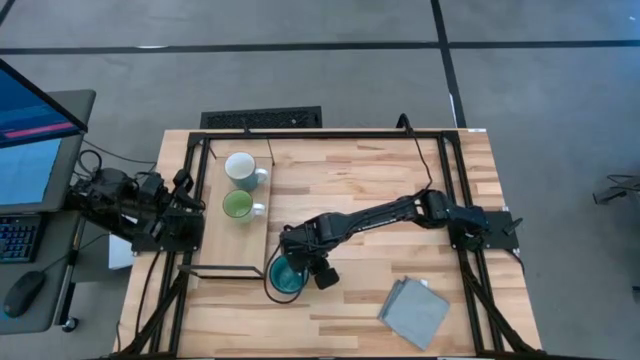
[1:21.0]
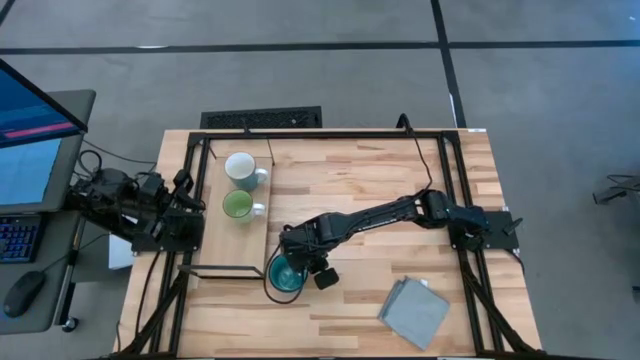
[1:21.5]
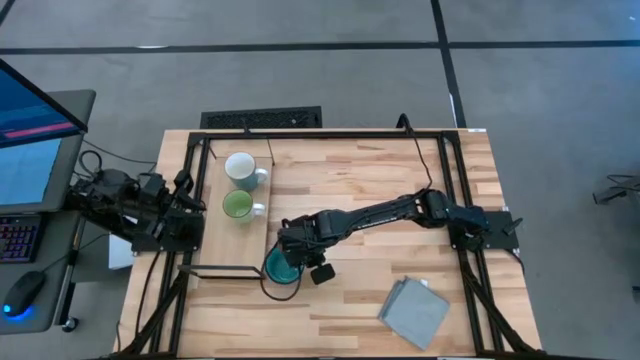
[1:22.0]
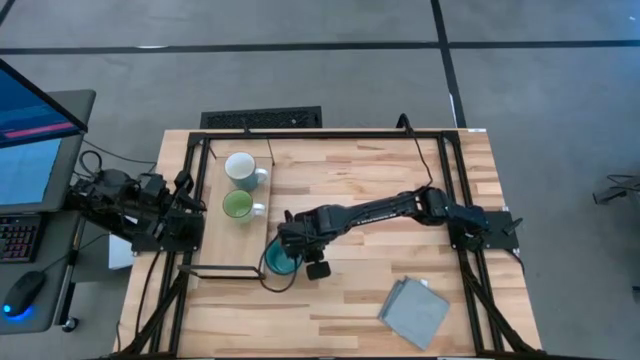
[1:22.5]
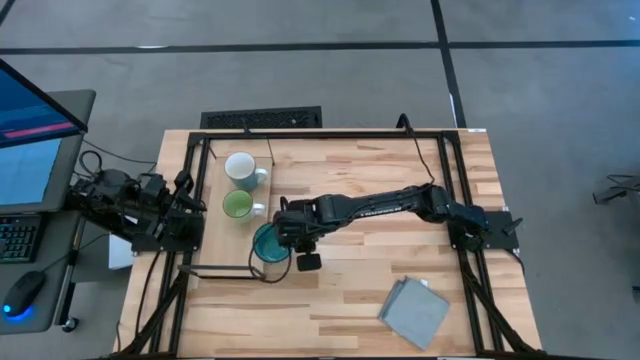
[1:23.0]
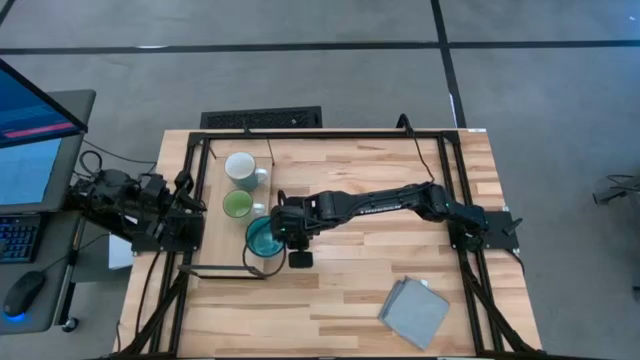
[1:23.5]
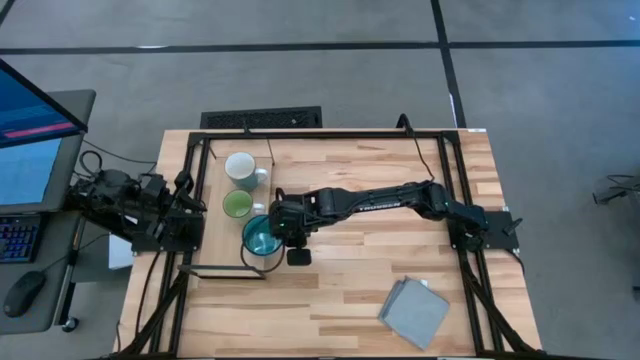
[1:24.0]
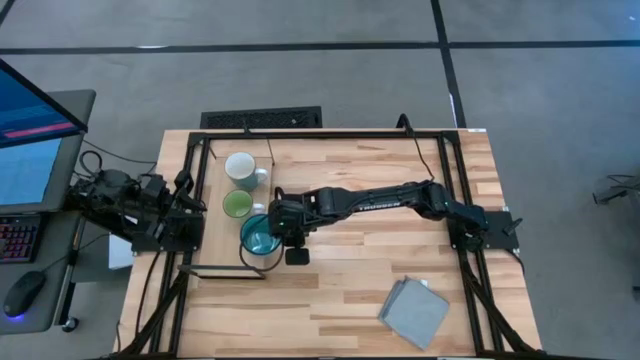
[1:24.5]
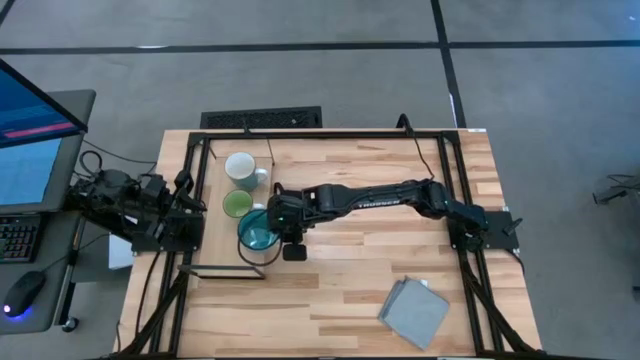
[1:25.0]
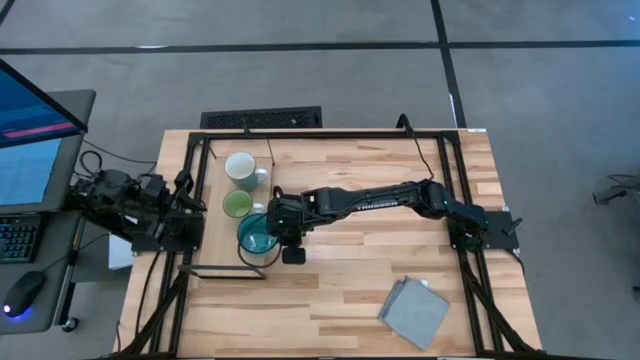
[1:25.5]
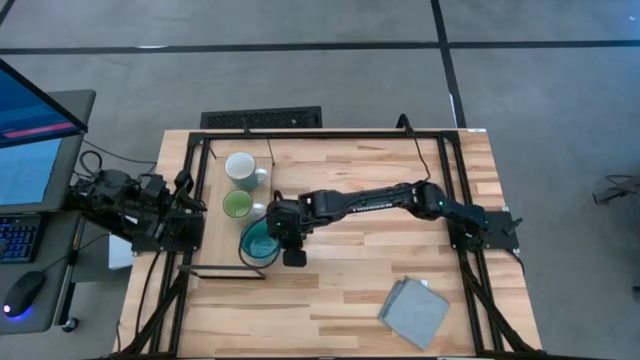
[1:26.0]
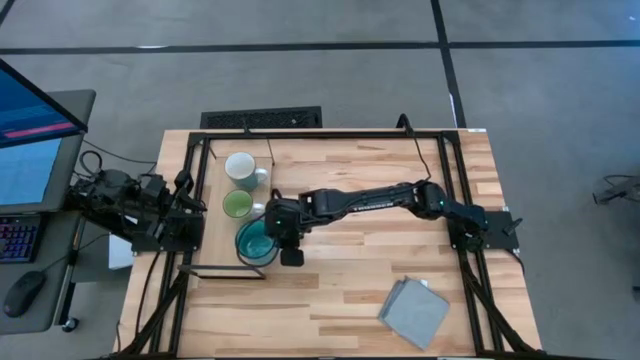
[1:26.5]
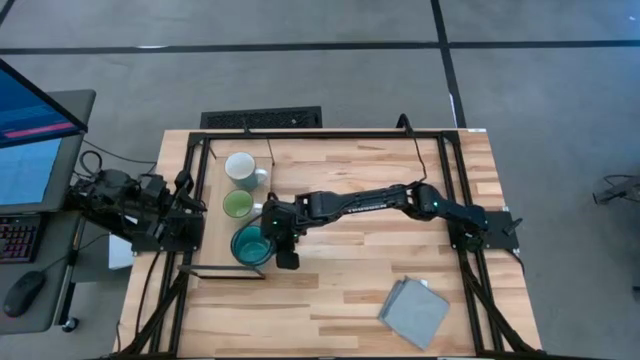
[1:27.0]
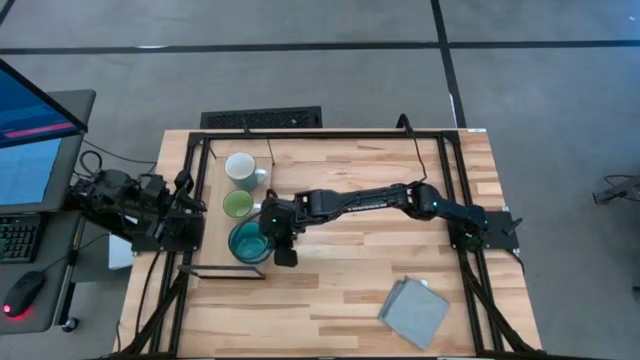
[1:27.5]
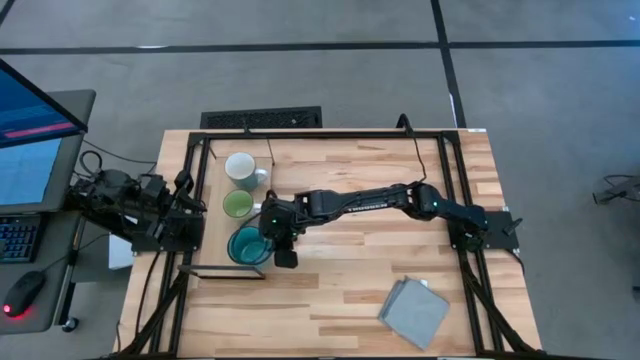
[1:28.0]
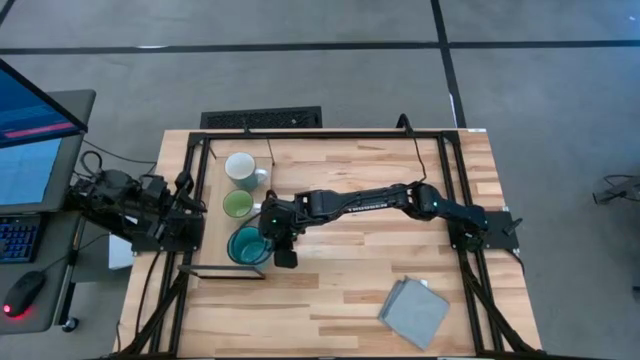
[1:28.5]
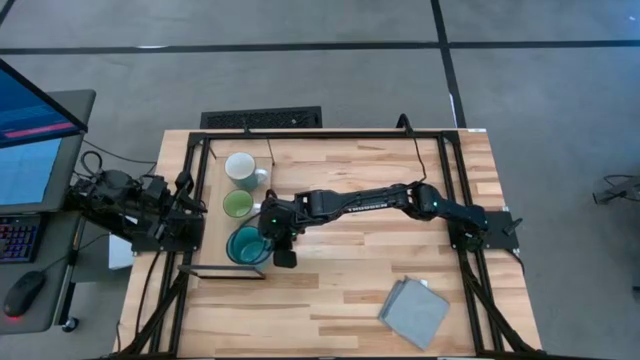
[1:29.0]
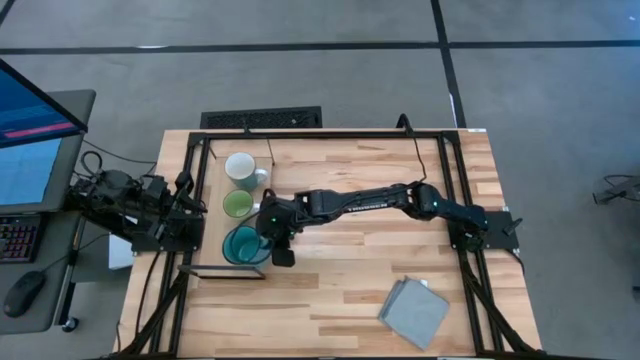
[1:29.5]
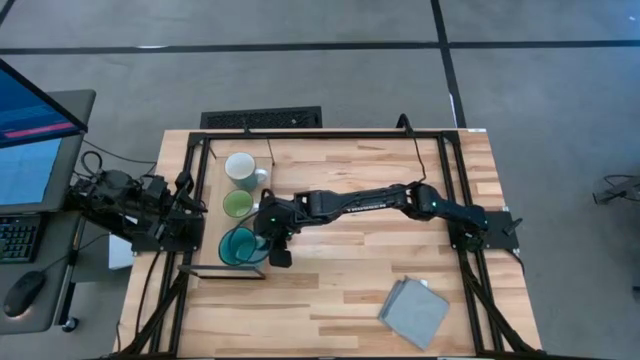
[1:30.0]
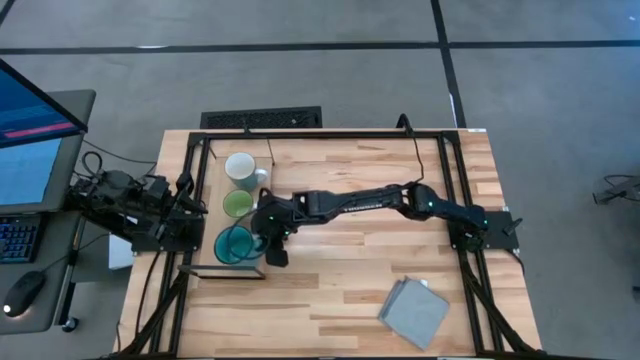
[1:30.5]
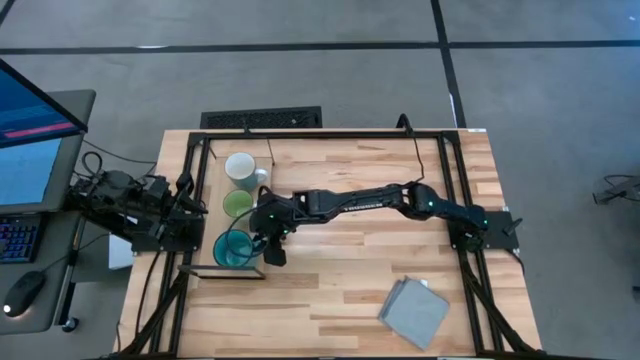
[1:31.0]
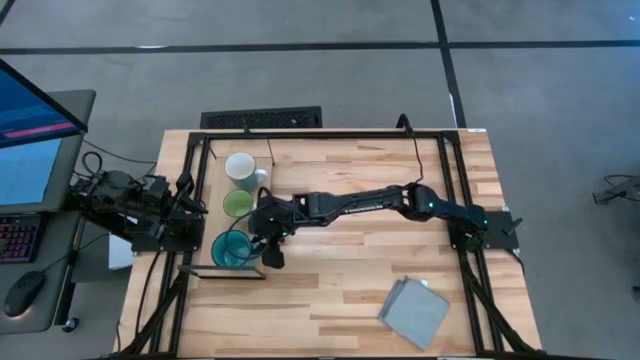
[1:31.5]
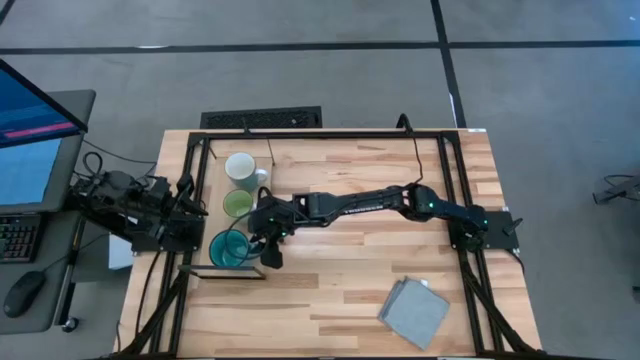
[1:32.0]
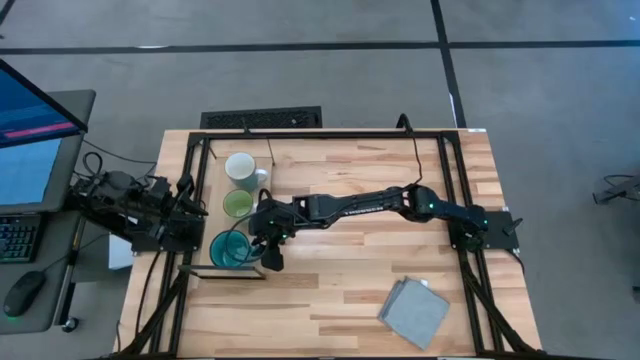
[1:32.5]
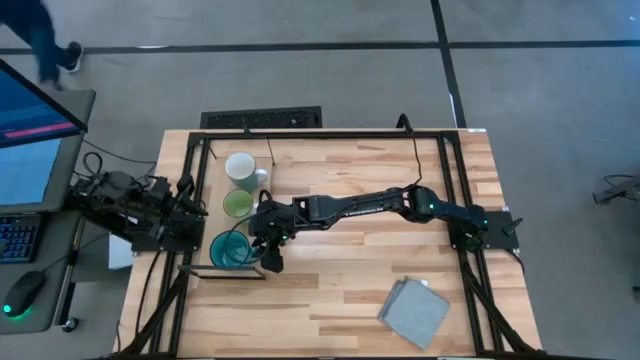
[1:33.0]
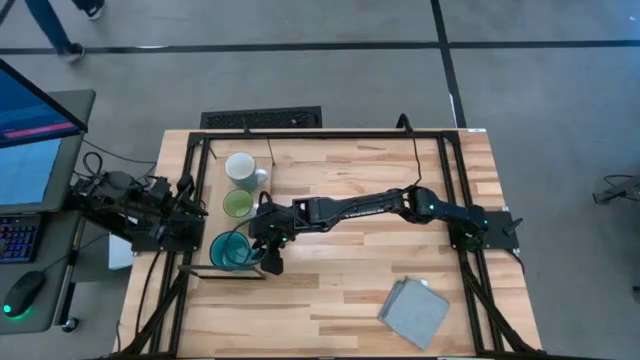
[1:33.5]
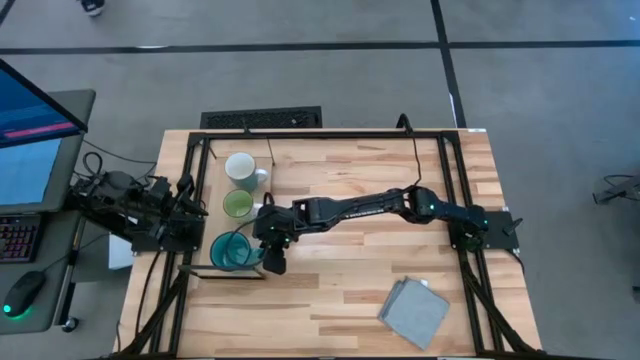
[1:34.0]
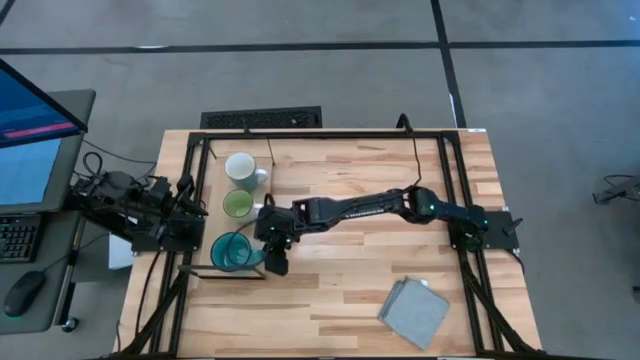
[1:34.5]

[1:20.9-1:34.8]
Task: Stack small to large cups/mugs on shelf
Put the blue mug on the shelf

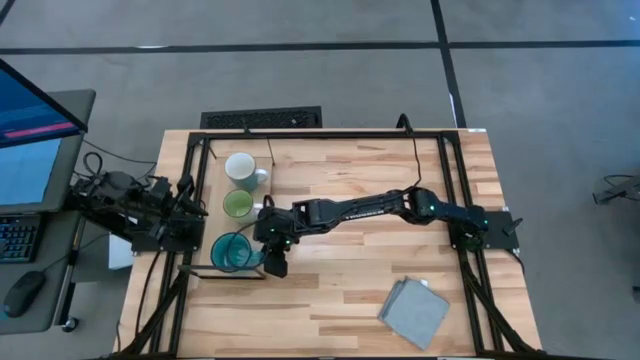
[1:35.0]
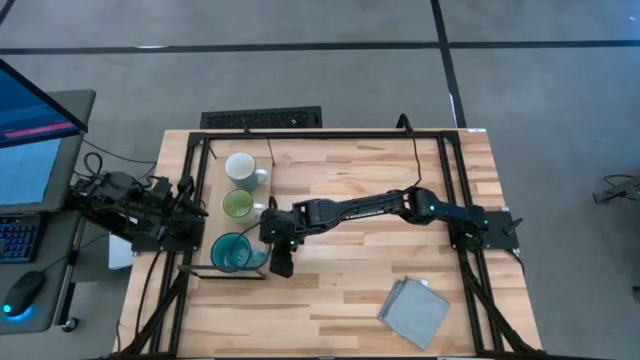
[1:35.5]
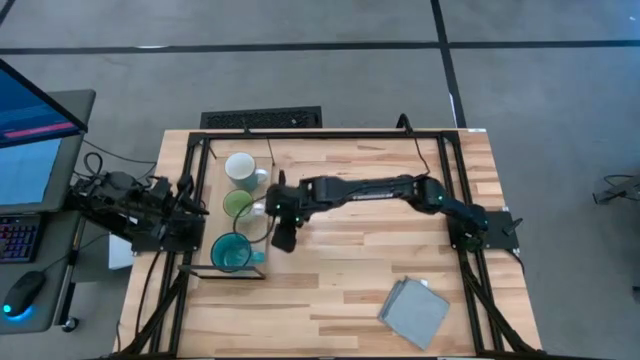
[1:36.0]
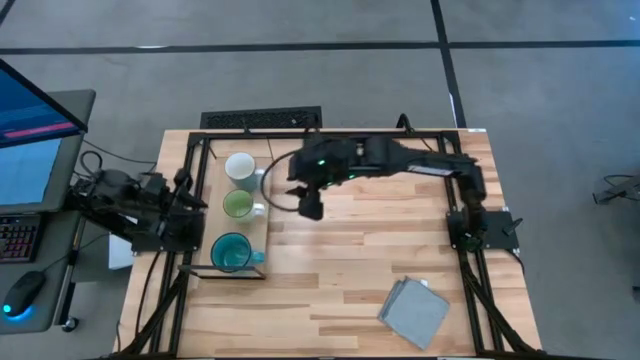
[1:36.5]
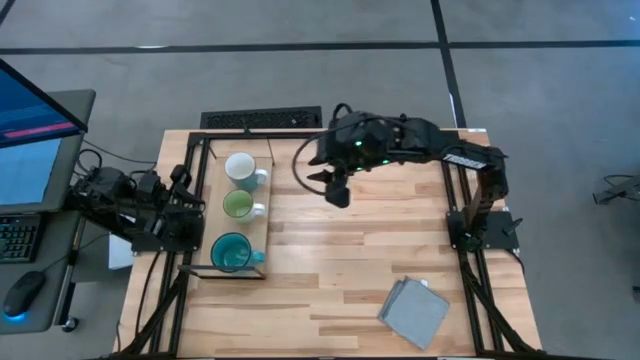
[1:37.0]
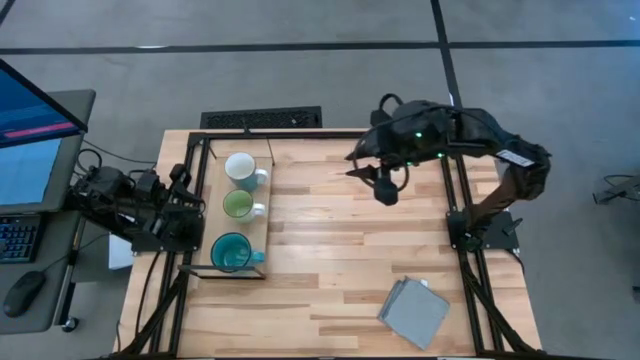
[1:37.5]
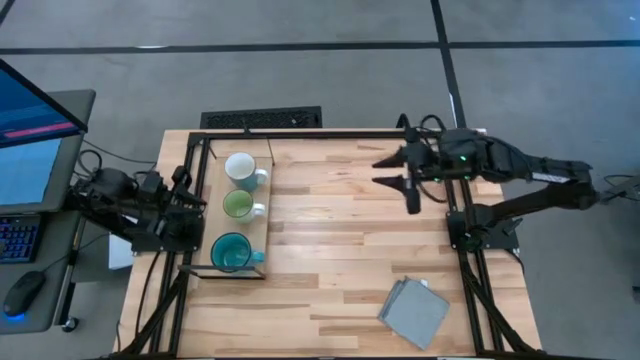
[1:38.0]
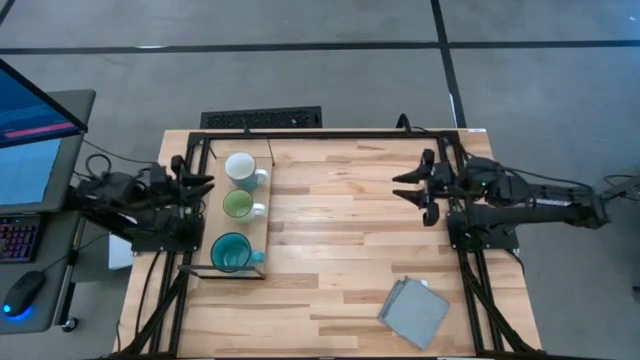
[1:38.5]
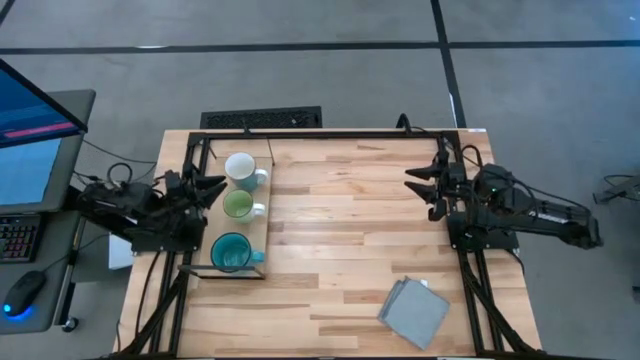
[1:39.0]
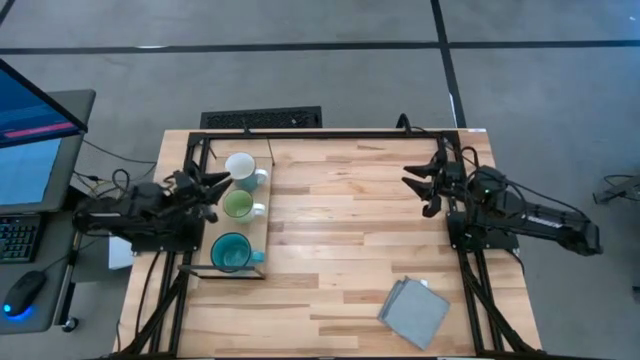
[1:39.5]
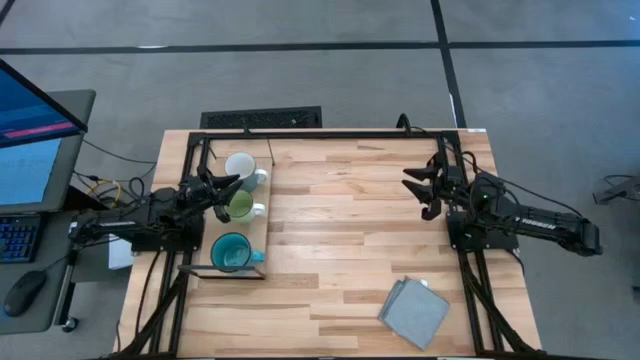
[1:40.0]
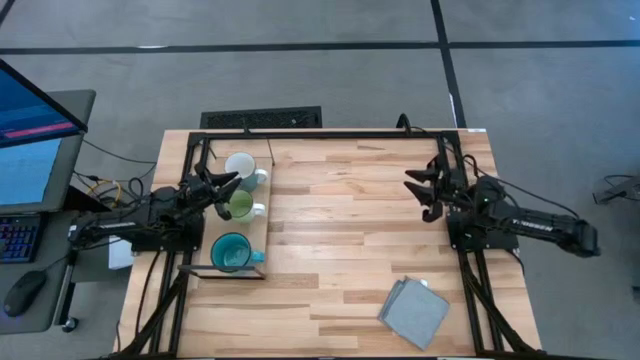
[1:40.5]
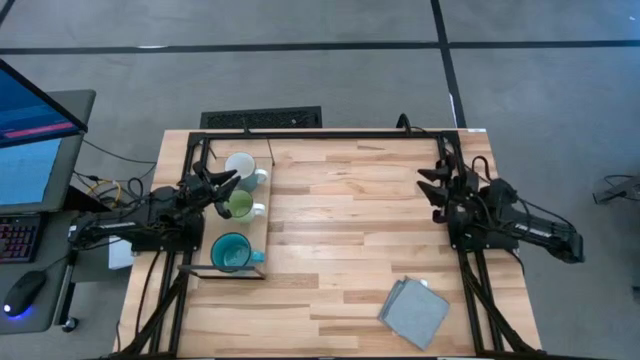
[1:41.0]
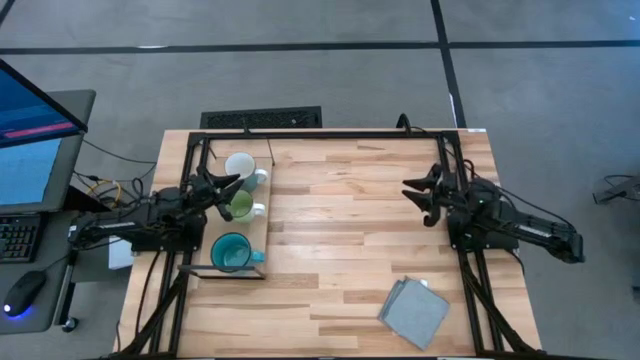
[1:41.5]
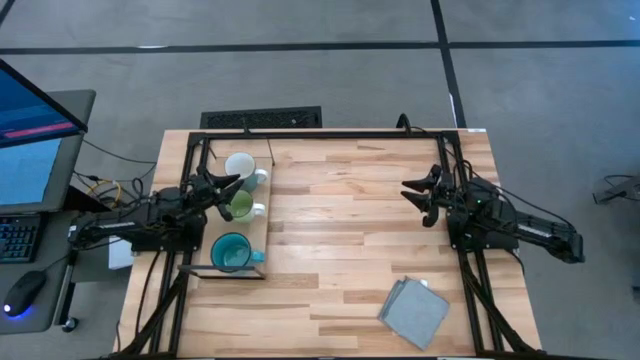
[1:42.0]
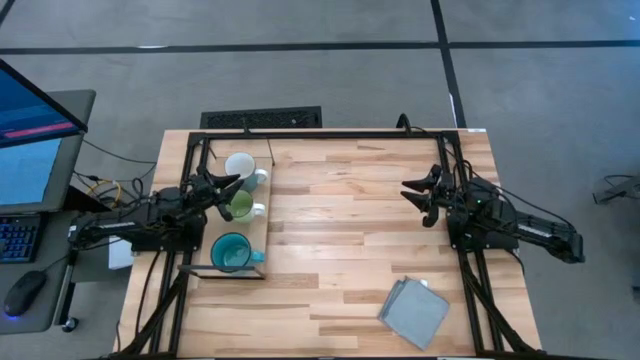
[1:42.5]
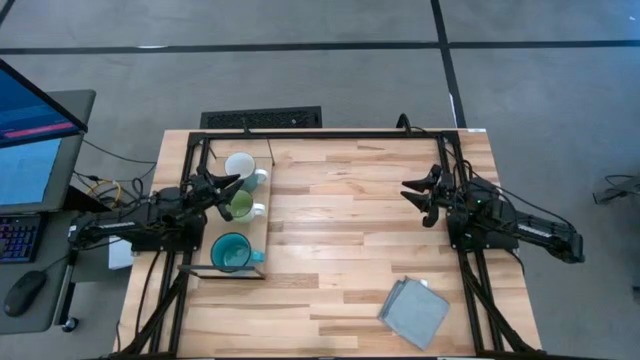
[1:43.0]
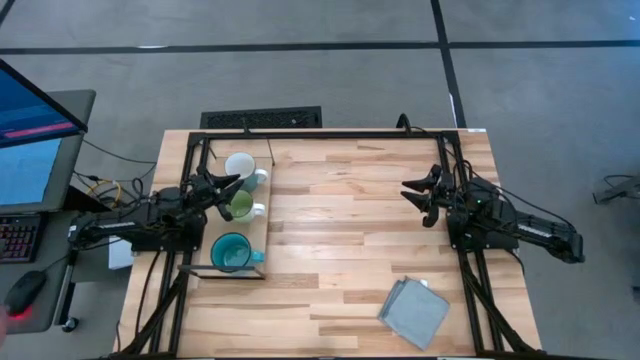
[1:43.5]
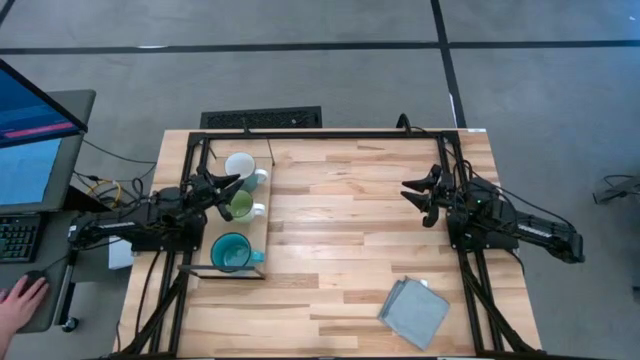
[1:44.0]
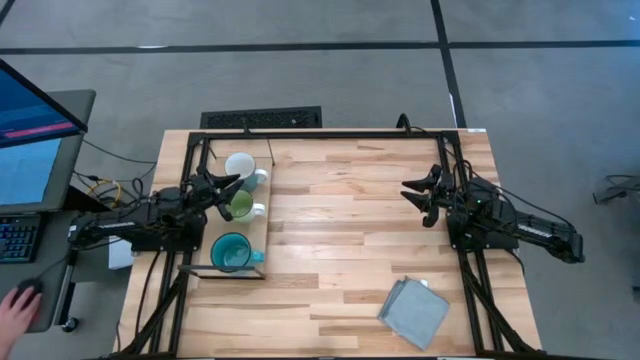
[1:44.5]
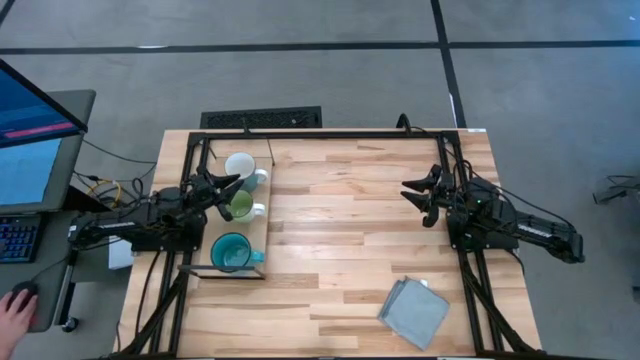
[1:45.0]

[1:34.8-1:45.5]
Return to Home Position
